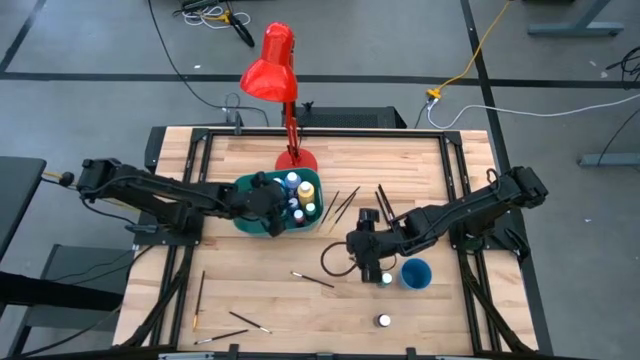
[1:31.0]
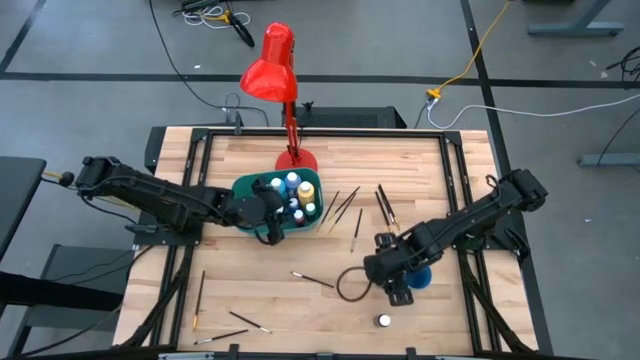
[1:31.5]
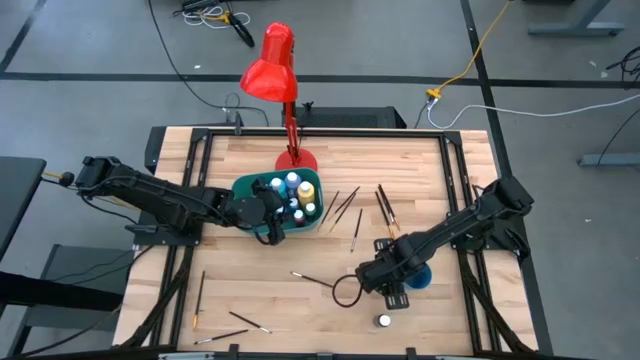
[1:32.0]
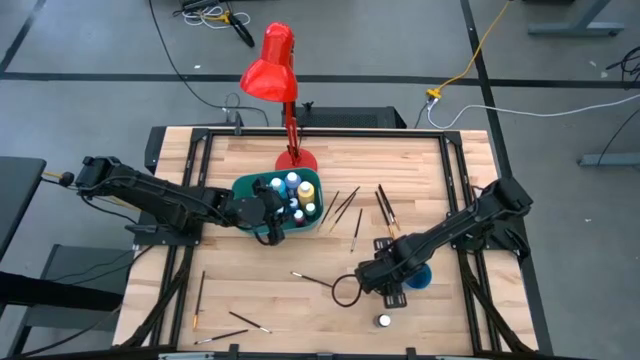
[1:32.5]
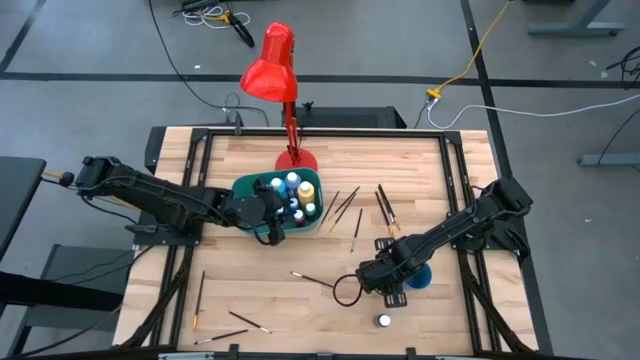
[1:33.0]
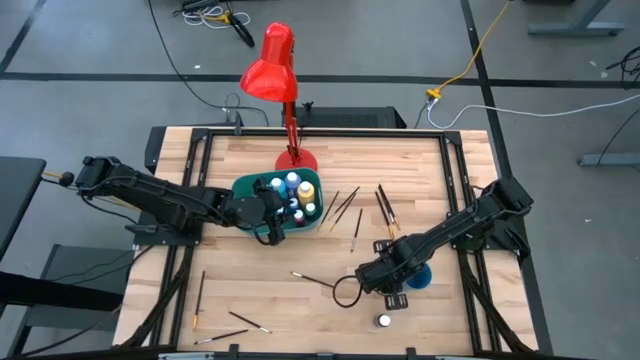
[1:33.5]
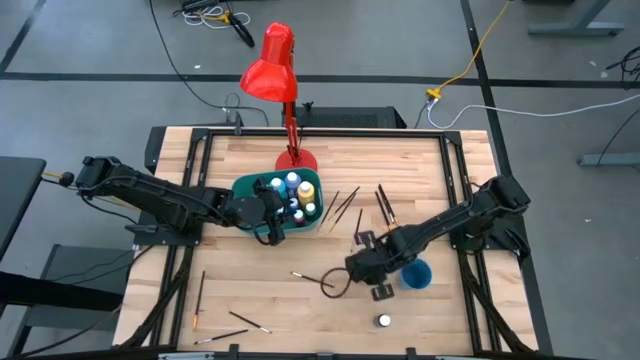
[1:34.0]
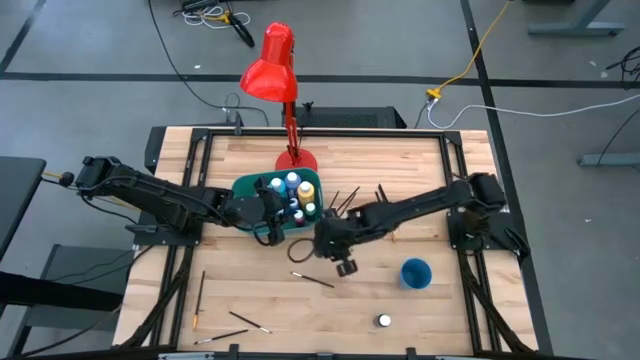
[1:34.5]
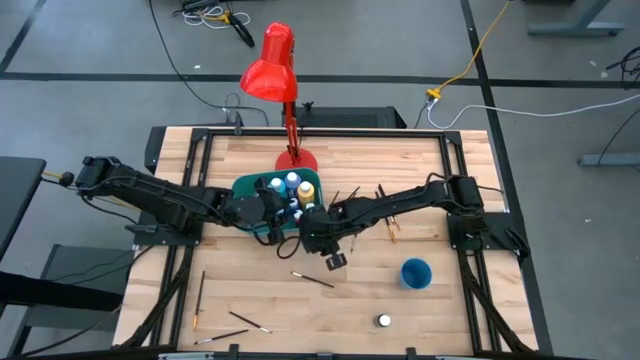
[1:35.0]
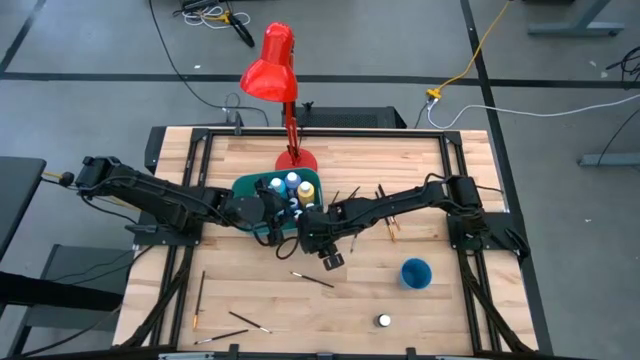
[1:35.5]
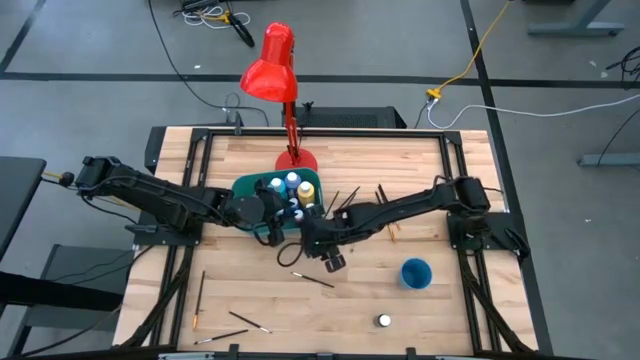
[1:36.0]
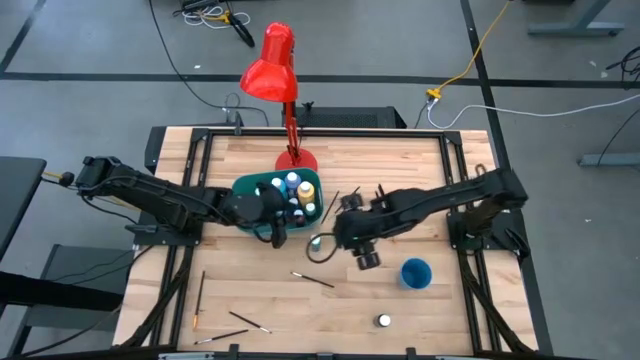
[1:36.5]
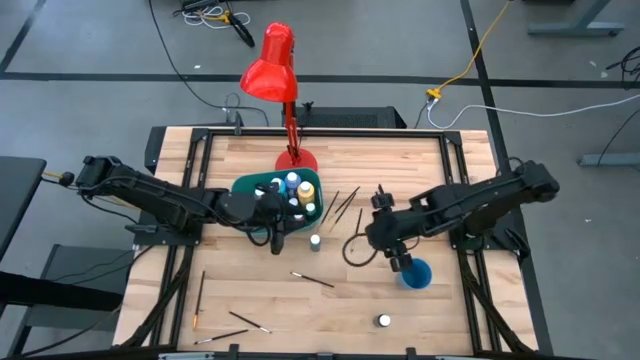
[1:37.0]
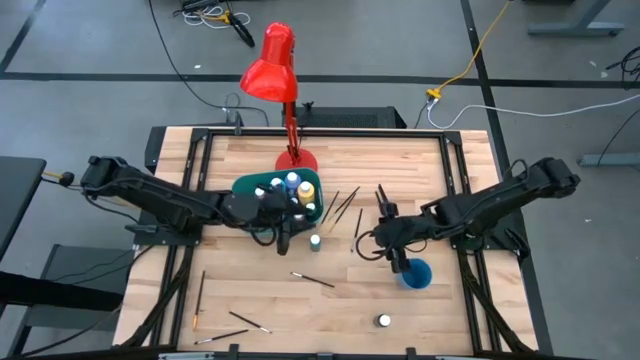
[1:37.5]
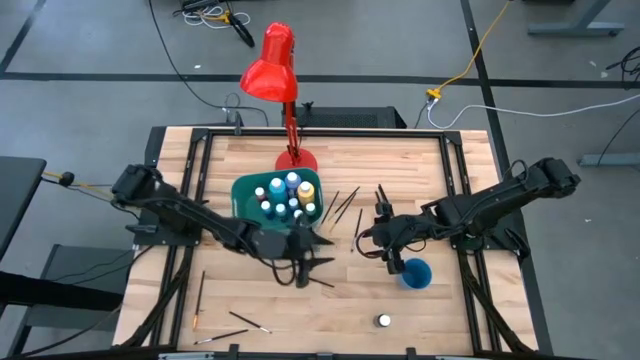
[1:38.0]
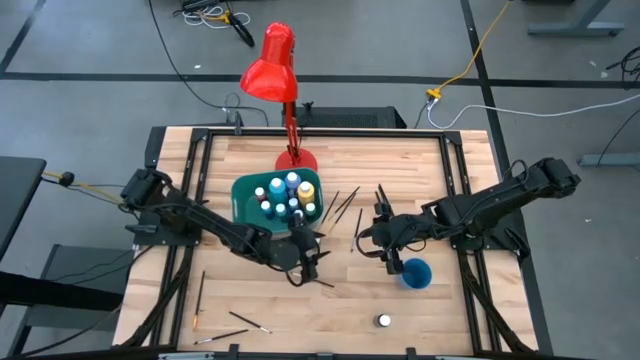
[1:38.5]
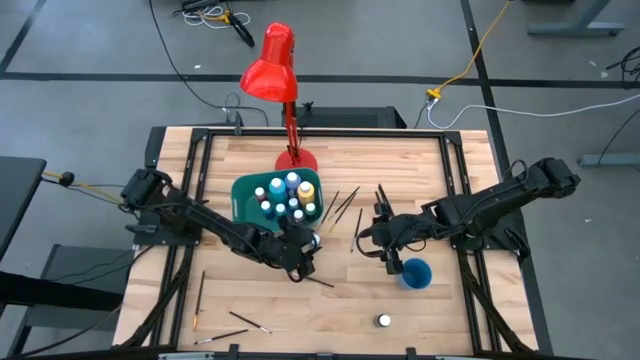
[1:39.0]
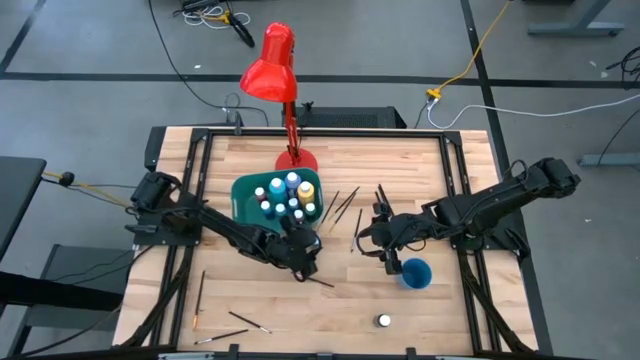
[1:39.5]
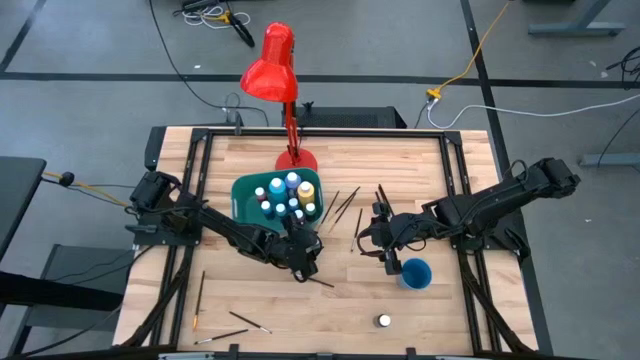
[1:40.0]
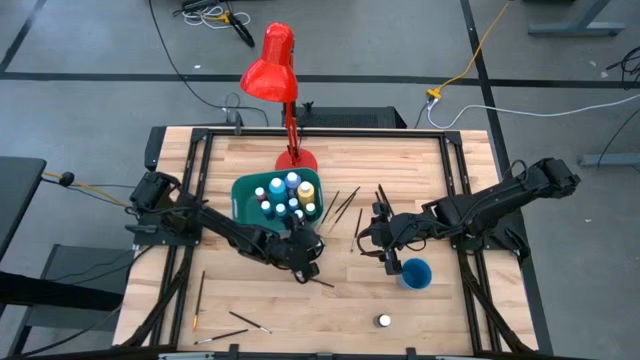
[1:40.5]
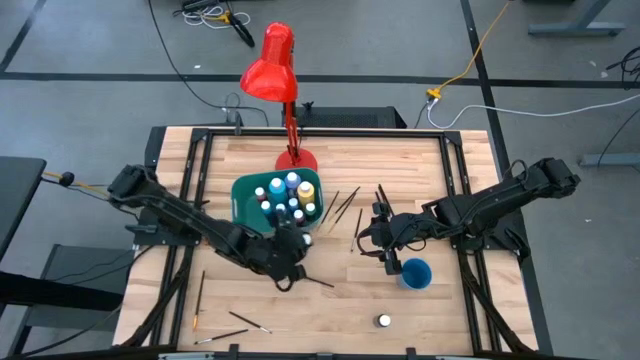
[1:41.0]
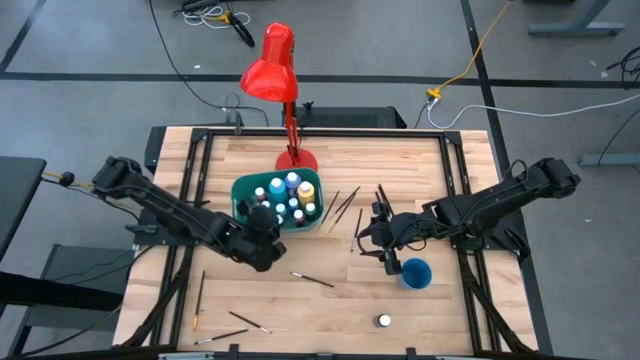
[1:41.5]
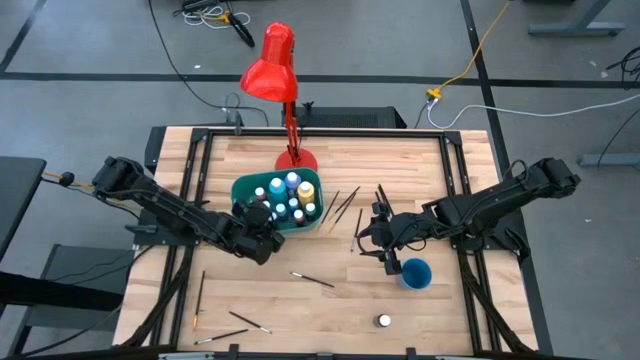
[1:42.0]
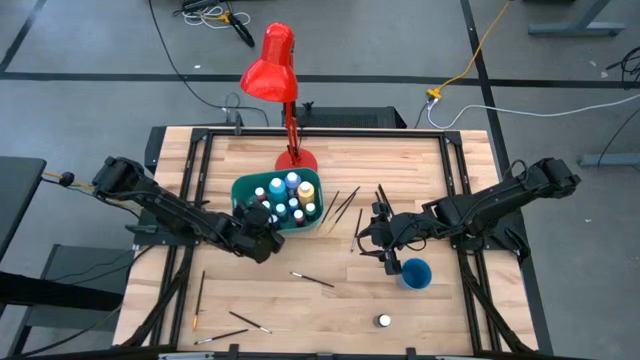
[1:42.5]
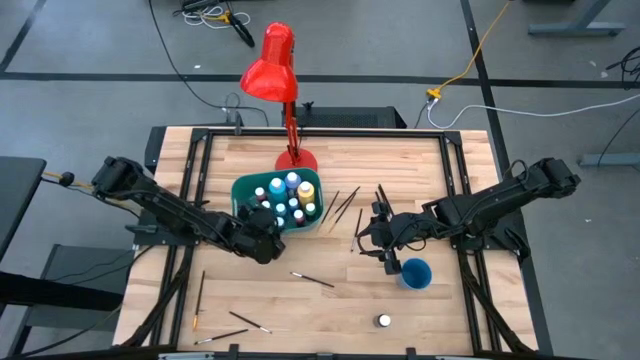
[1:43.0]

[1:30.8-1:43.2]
Task: Pick & Place Paint Supplies
Put the small light blue paint bottle into the green bin

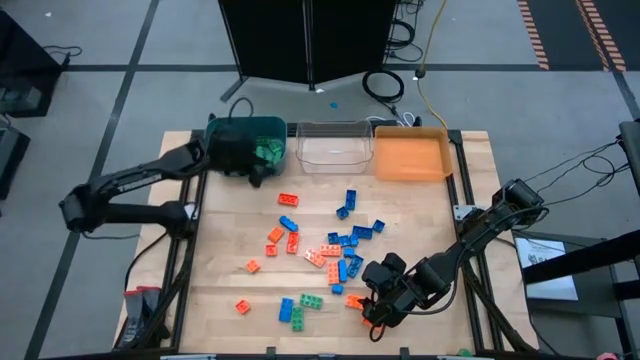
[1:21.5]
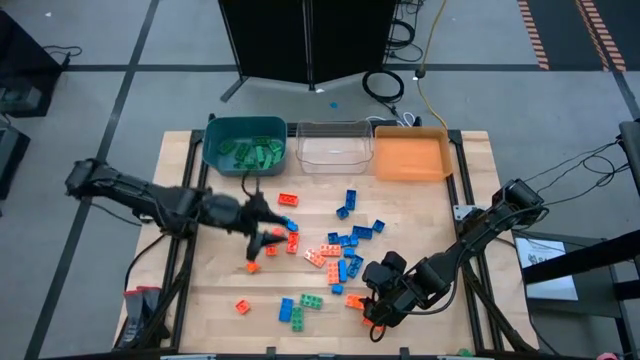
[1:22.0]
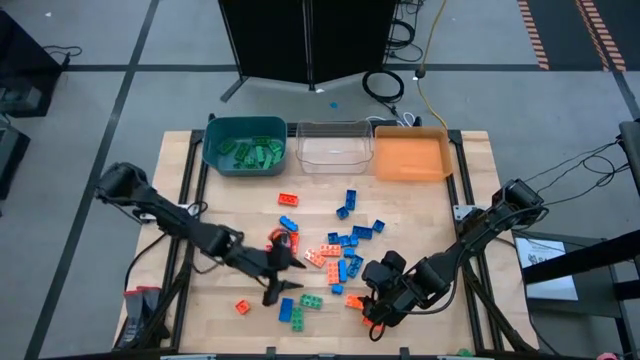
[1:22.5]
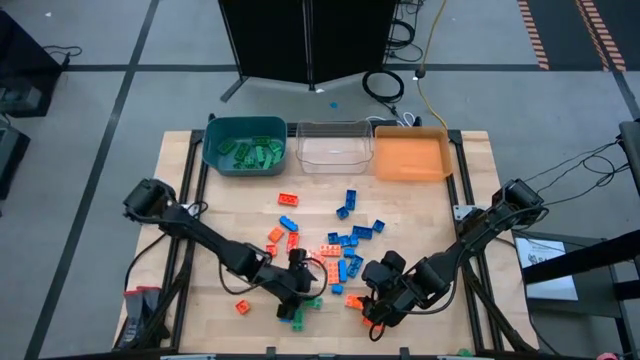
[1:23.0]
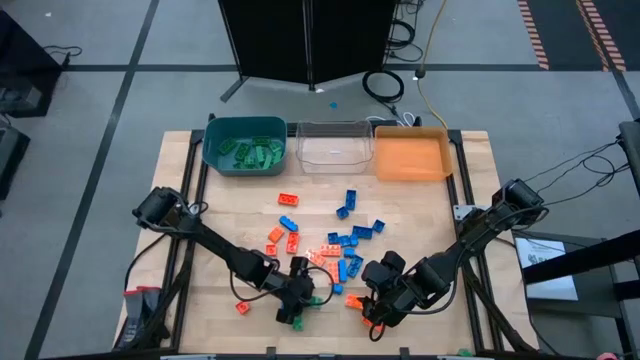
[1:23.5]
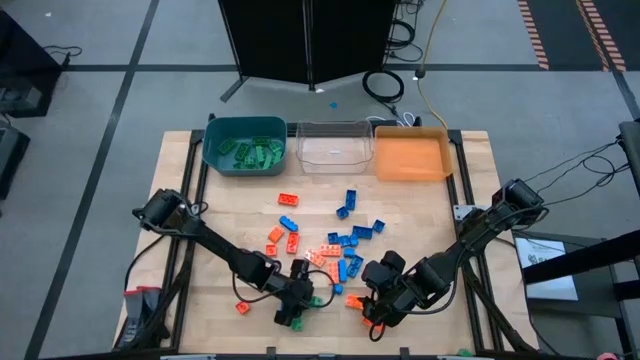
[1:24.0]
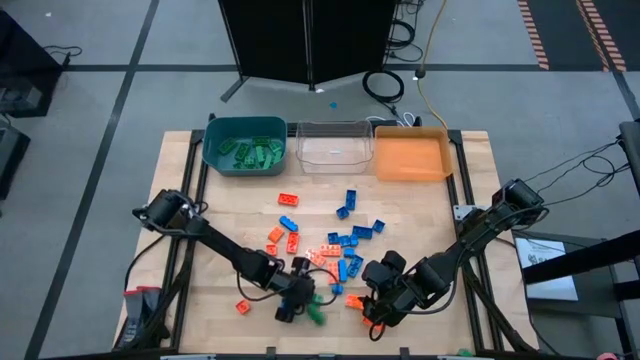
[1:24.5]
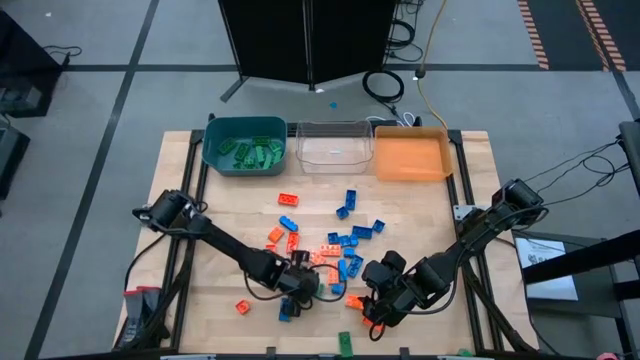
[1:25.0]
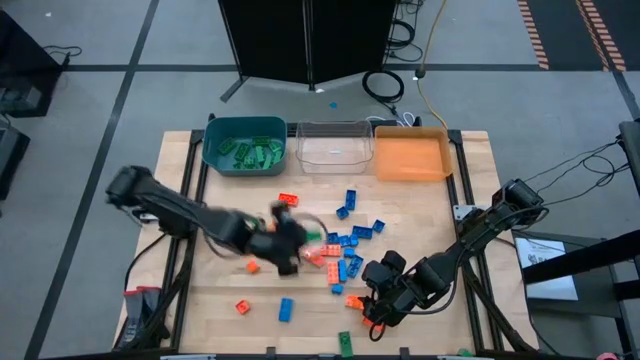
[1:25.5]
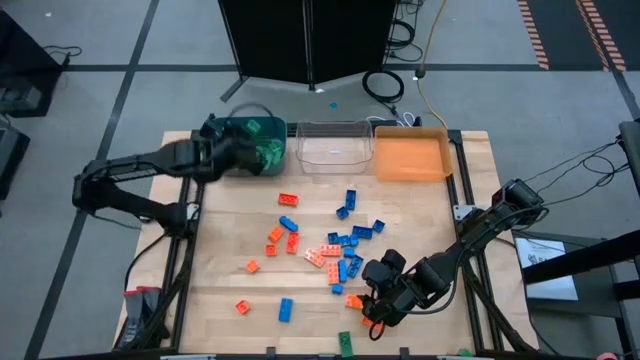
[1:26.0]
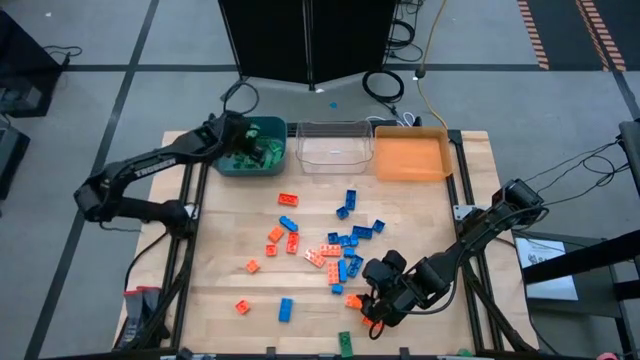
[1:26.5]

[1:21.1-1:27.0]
Task: Sort blocks
Put the green game piece into the blue bin

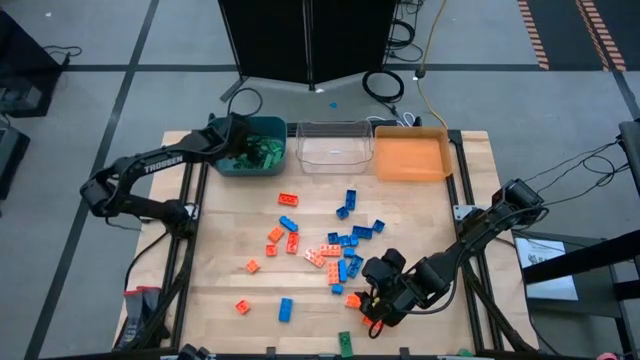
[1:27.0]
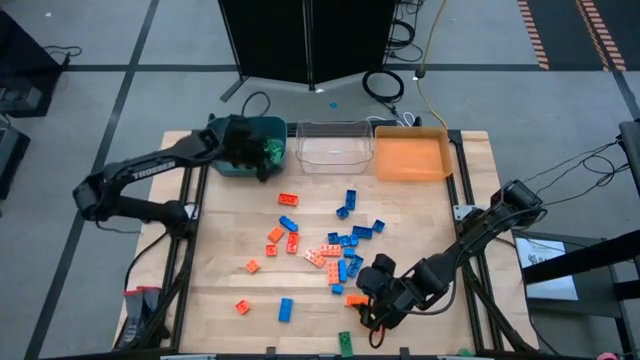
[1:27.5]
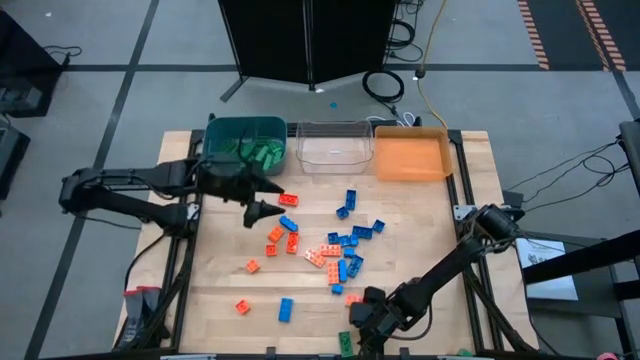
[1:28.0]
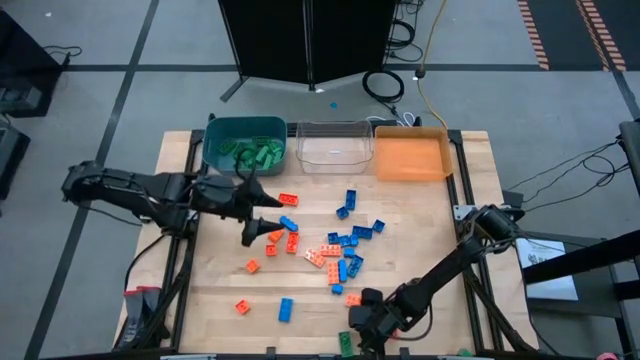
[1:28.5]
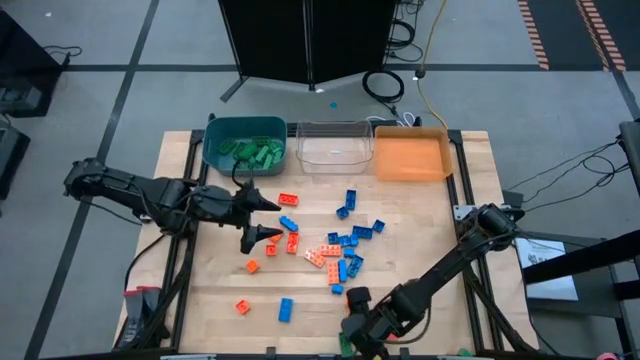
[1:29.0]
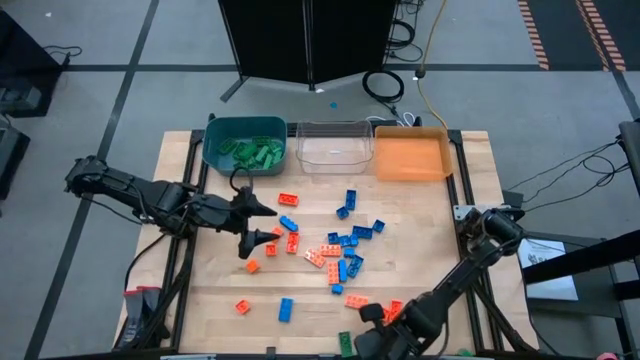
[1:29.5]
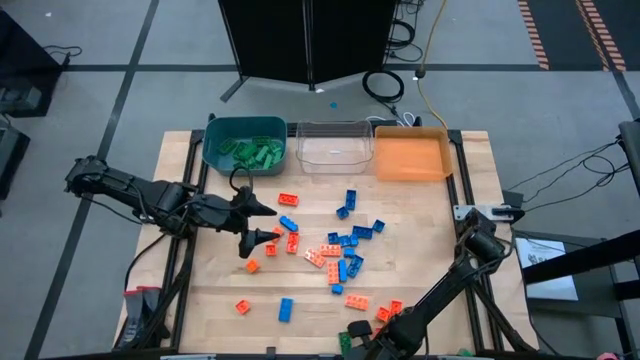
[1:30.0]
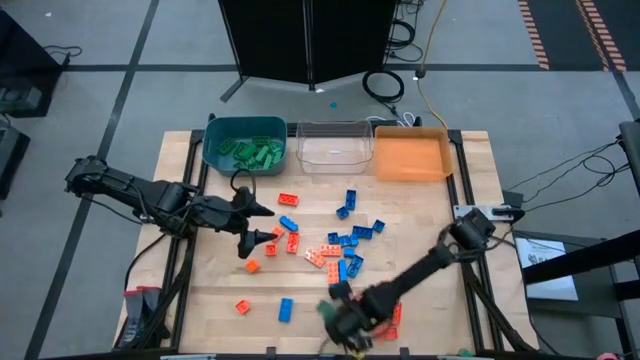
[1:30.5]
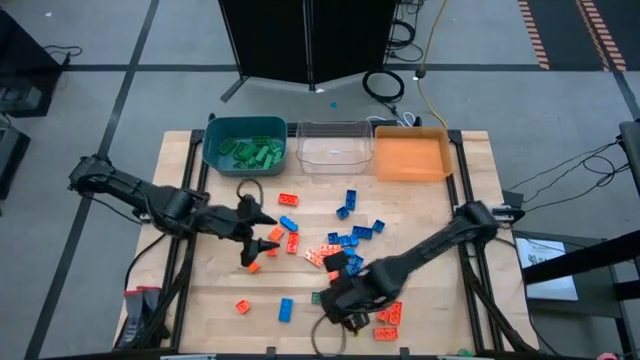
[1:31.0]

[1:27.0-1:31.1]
Put the green game piece into the blue bin
